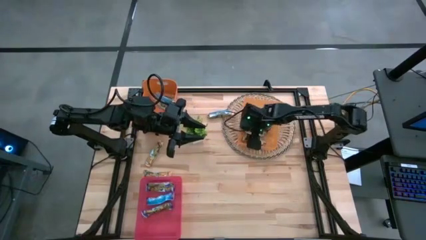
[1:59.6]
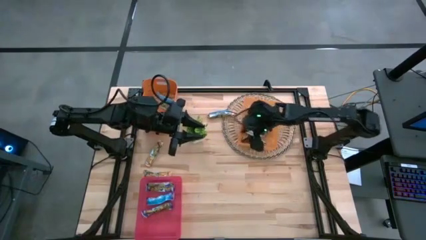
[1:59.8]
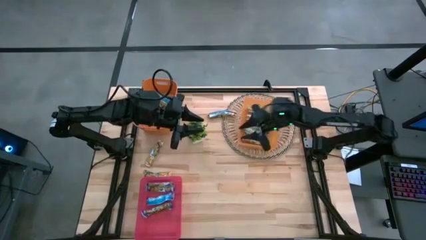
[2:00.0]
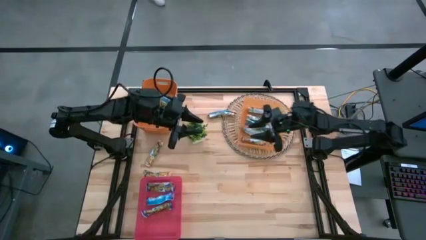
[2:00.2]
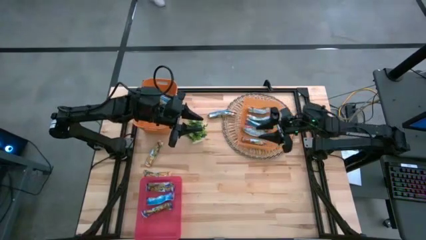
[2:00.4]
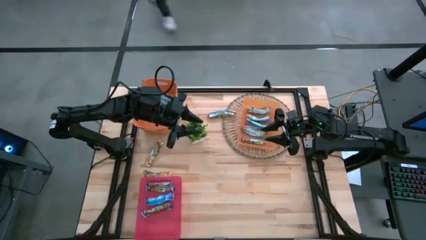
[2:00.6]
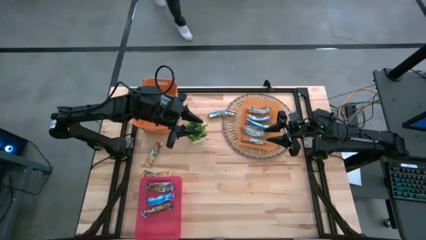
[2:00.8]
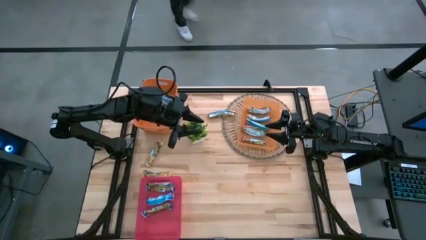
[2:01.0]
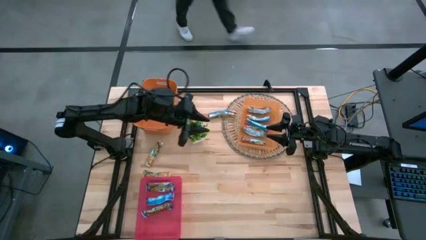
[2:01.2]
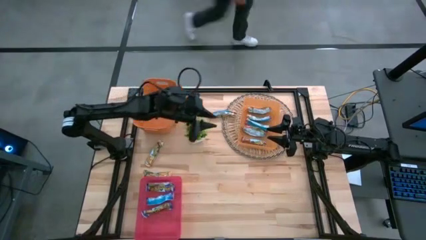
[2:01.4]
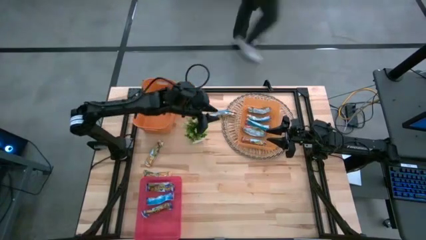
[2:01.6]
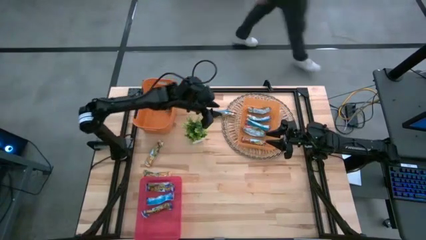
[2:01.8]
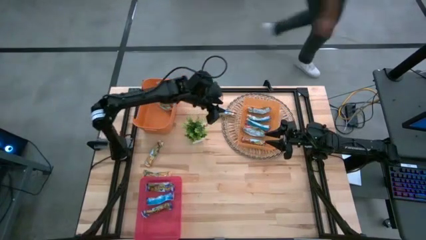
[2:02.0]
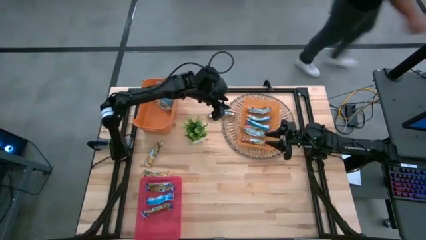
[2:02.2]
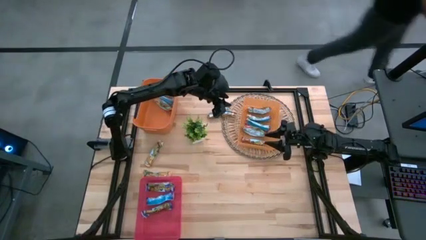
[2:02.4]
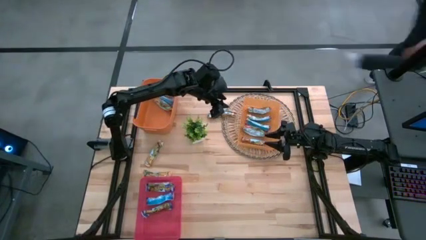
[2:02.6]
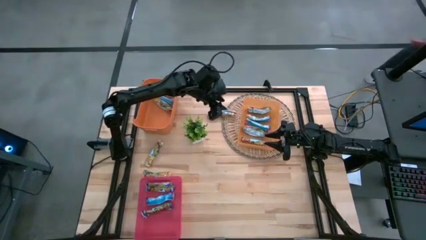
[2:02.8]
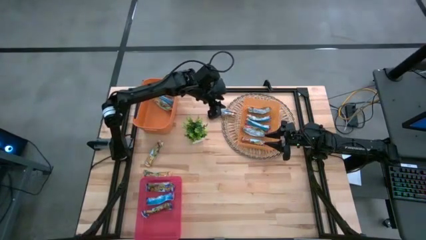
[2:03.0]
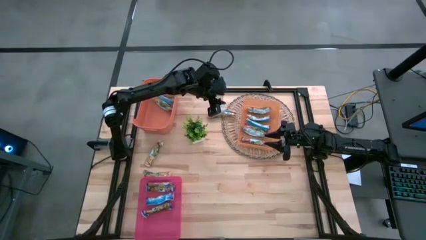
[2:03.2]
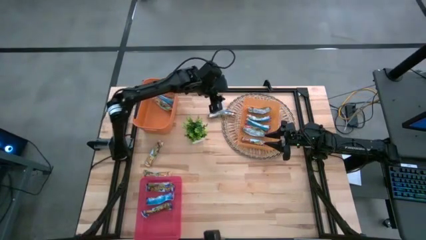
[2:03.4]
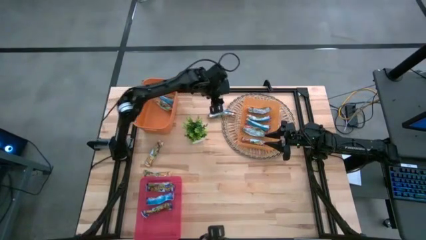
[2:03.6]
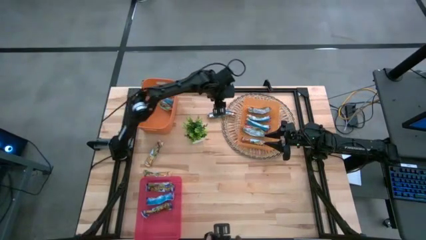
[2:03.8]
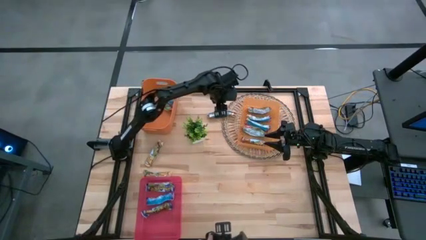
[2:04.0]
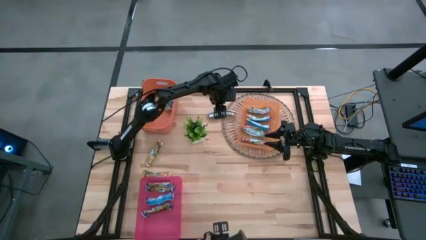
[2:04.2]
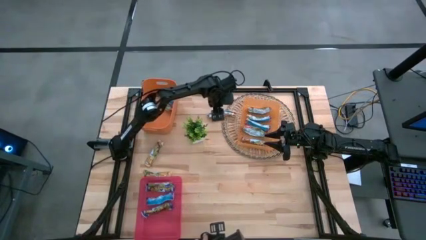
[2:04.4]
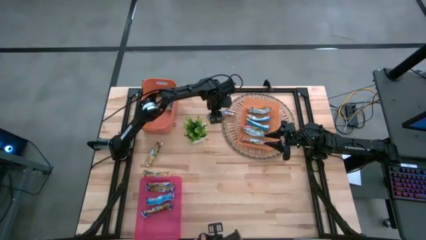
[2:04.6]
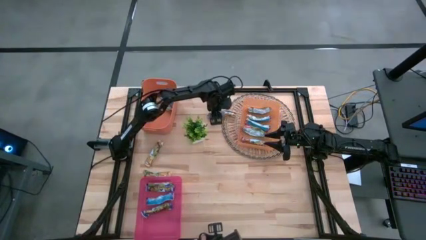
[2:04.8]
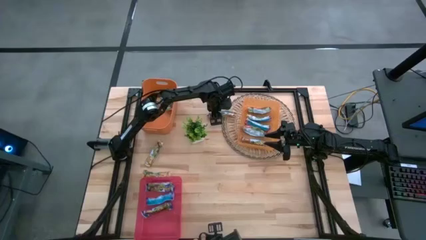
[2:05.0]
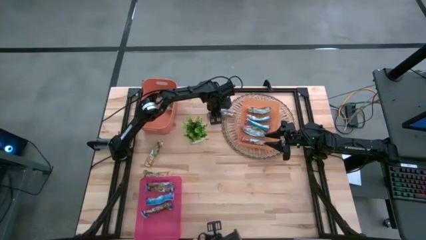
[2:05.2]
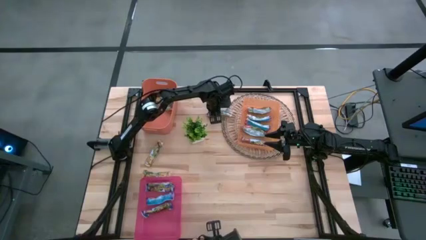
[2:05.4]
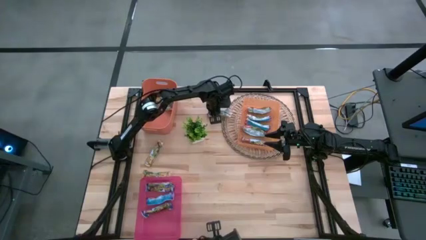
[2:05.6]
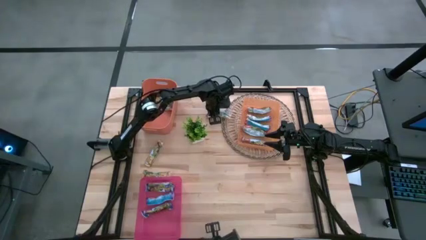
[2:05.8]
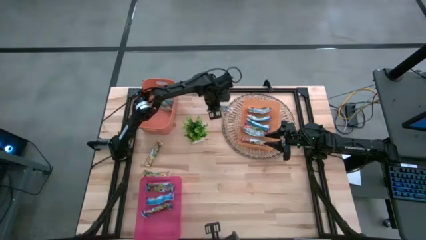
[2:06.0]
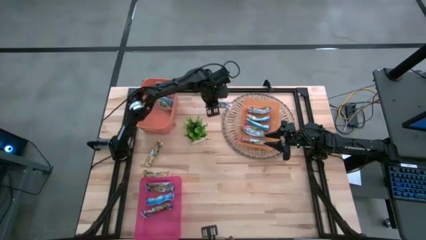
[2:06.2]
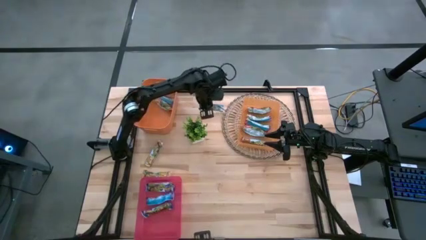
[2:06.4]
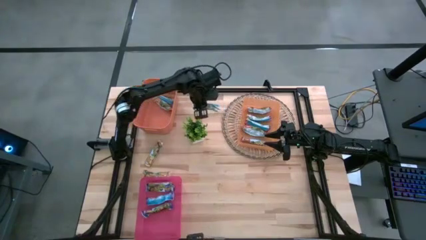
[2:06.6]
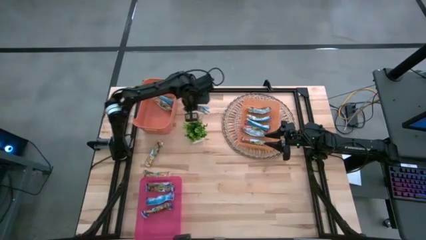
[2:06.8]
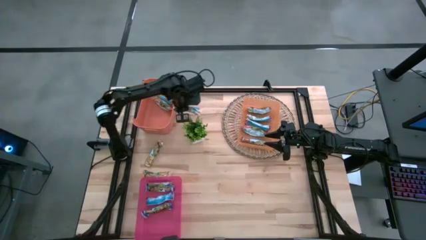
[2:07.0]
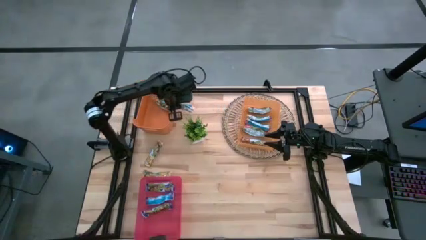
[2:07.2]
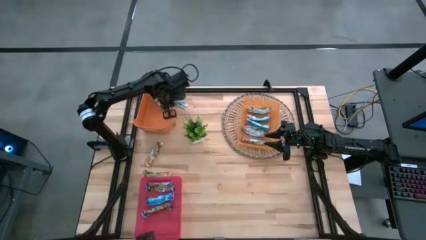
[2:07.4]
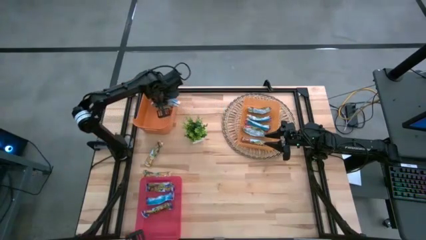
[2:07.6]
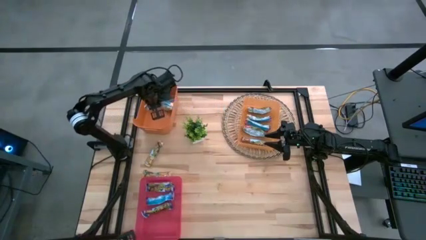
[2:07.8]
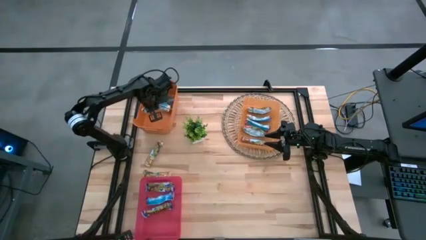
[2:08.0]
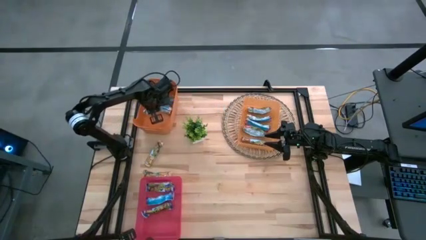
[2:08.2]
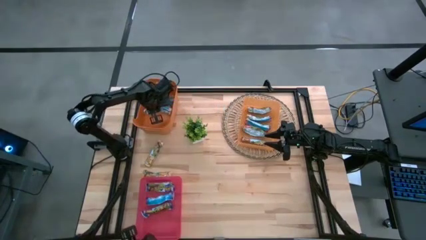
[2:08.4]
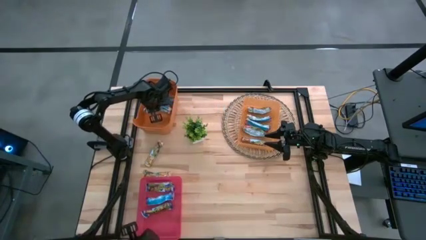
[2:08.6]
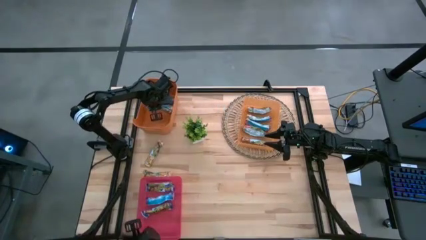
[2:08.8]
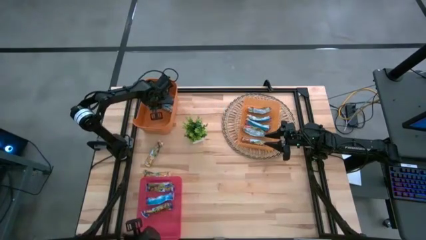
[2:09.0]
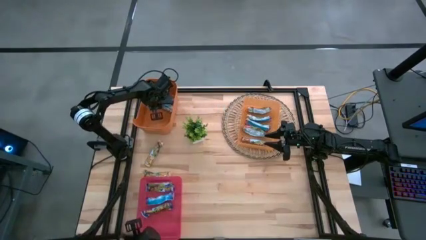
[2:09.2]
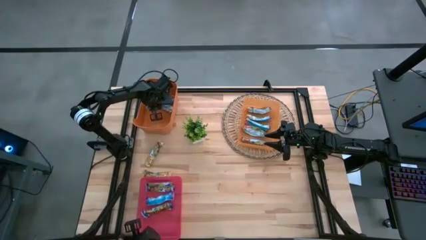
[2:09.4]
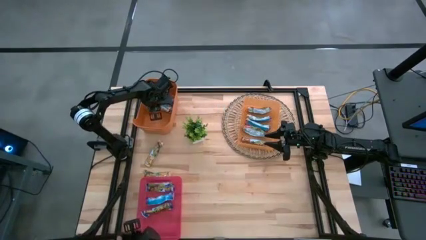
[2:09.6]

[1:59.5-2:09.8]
Task: Pick and place Granola Bars by type
Put the top yellow granola bar into the left orange bin

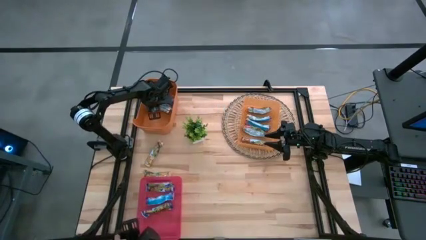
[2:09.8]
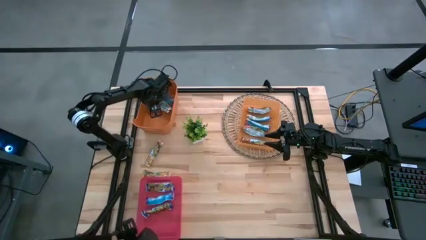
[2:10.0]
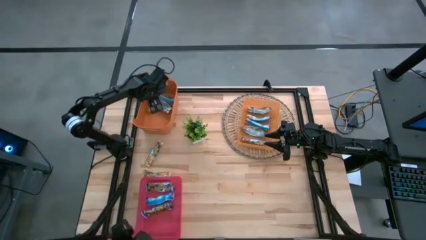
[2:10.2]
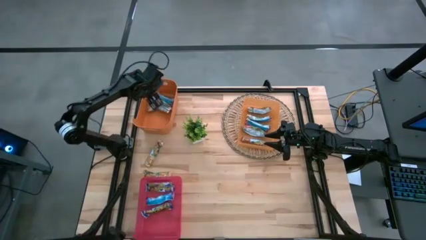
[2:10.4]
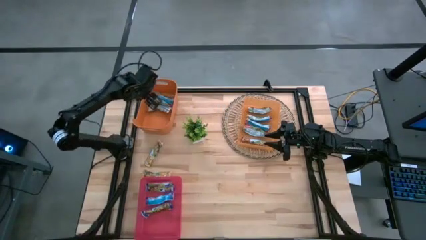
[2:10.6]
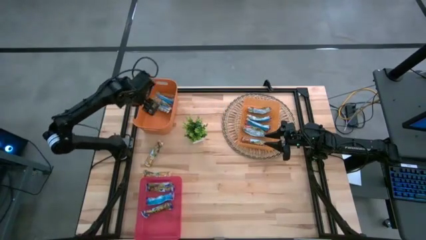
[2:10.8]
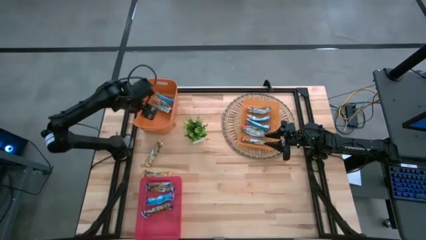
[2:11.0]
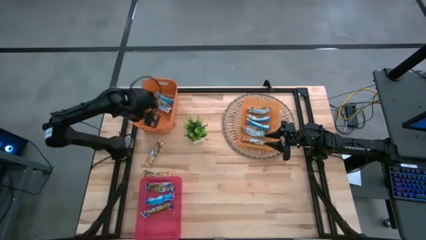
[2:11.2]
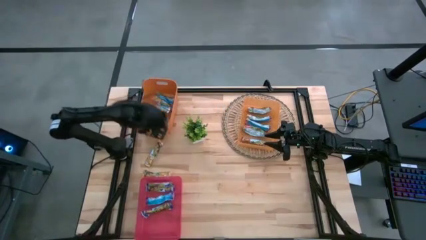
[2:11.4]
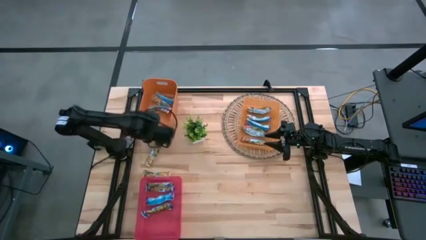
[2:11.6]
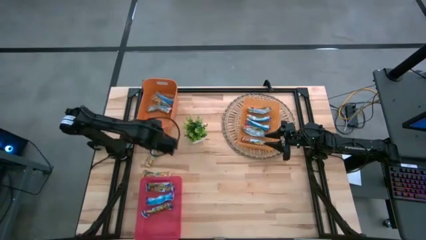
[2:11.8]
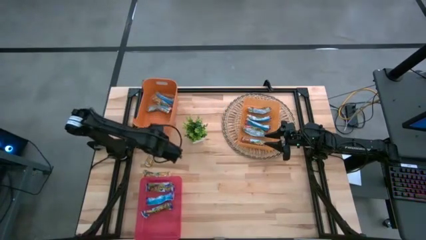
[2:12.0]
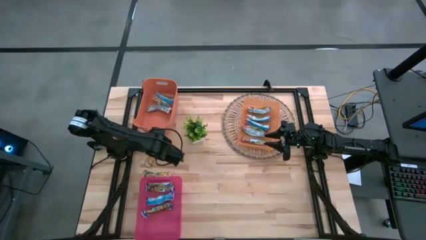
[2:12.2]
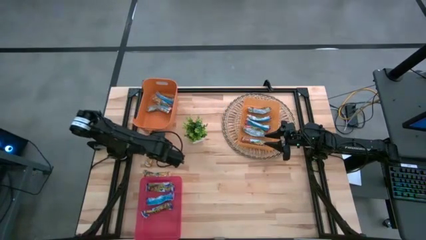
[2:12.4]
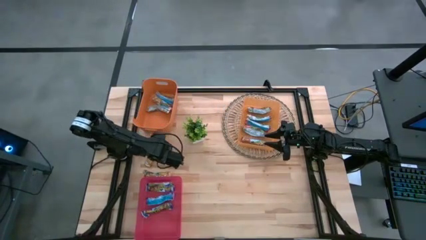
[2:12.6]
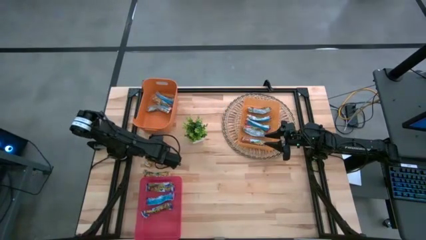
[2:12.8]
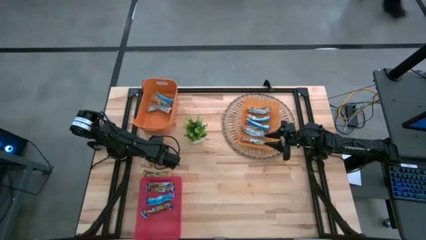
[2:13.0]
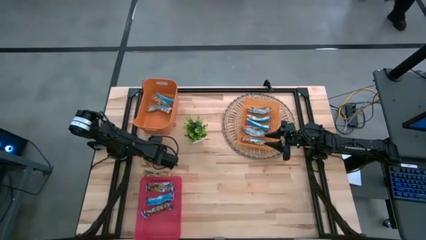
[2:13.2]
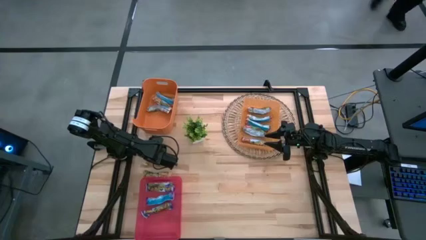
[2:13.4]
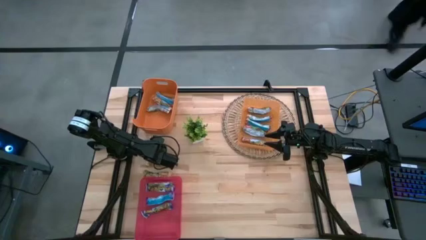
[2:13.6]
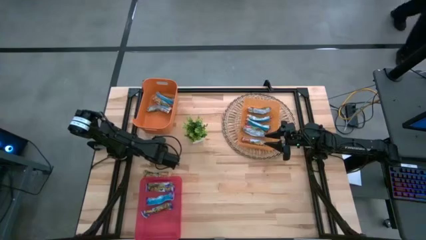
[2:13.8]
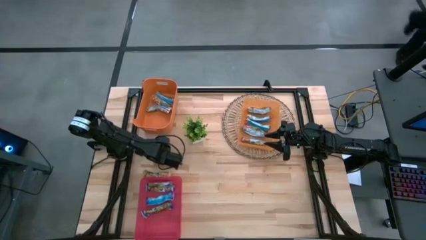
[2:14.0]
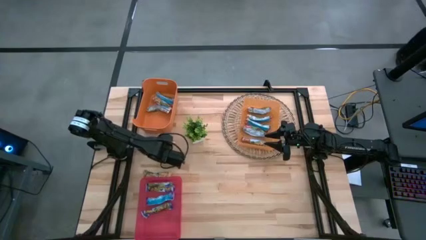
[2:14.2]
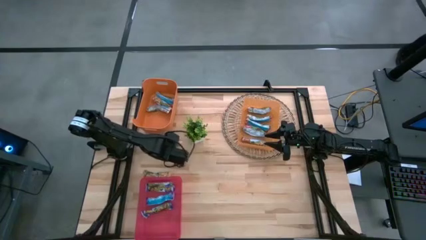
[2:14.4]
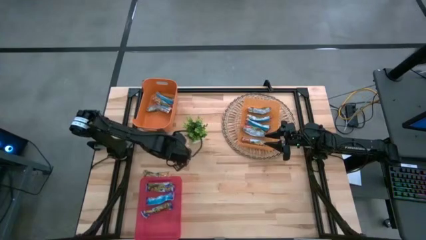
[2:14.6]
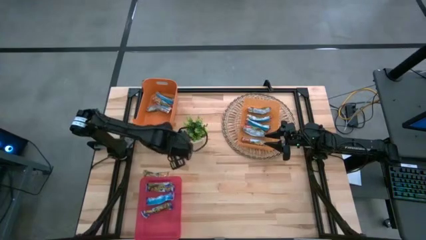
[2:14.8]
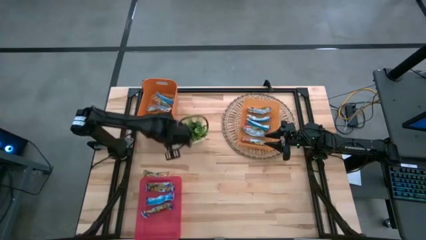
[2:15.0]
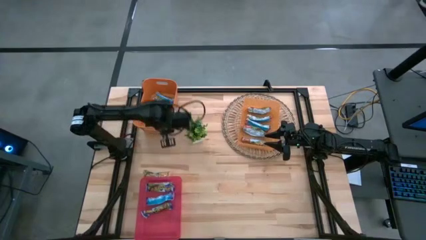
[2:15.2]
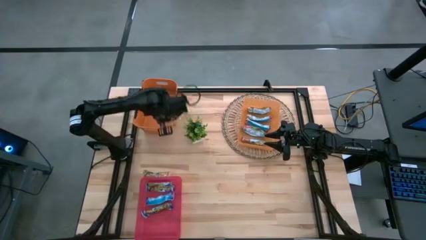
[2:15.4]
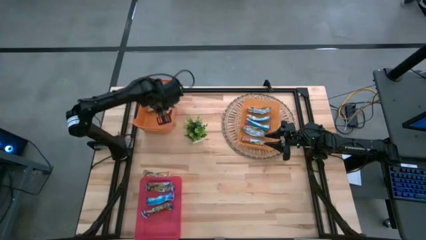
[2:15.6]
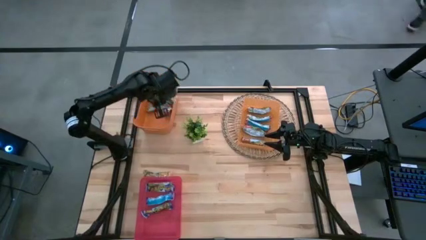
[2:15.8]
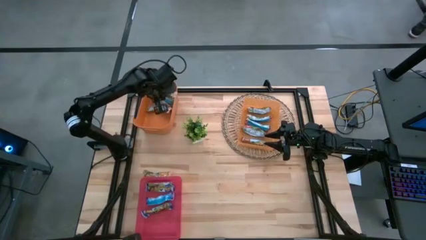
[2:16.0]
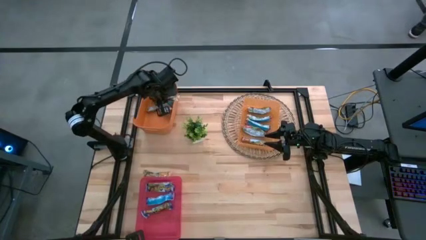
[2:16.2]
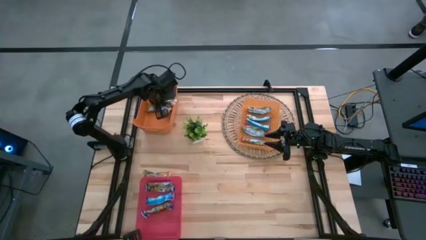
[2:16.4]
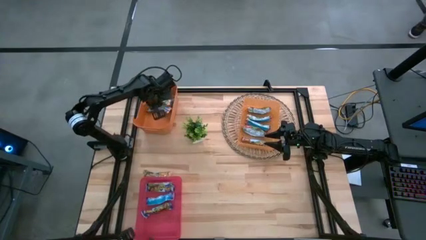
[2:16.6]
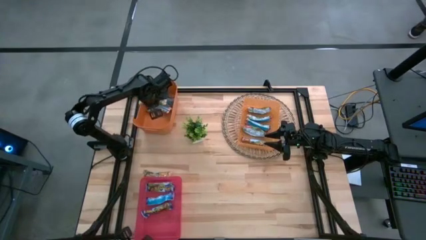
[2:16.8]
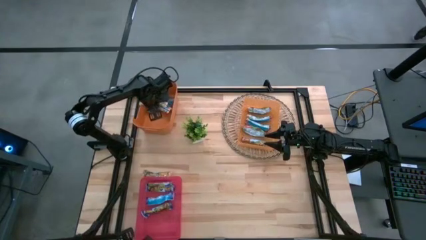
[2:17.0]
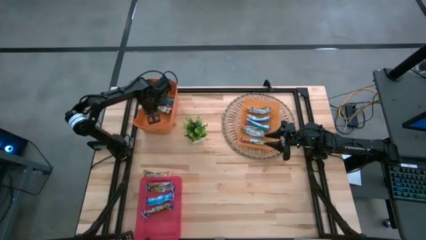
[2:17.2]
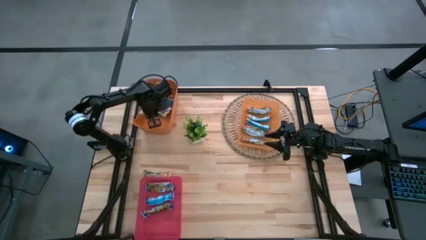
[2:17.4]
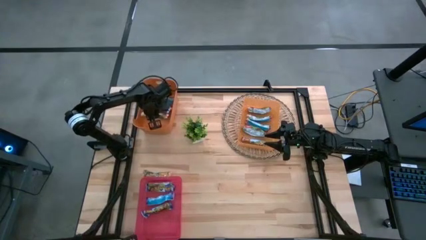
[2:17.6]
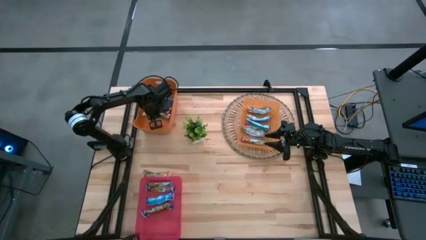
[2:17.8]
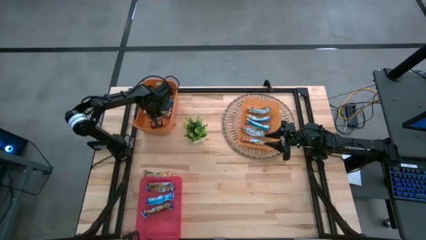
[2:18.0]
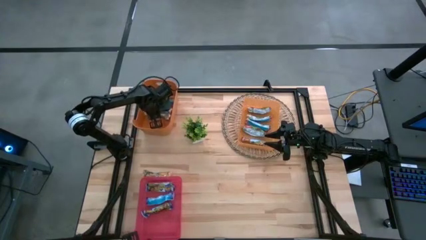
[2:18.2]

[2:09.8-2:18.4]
Put the top yellow granola bar into the left orange bin
